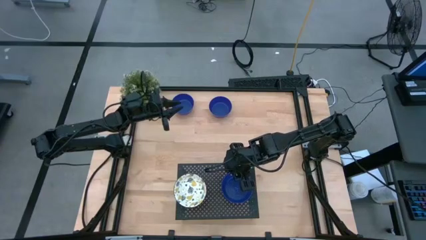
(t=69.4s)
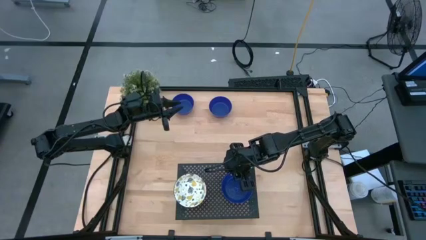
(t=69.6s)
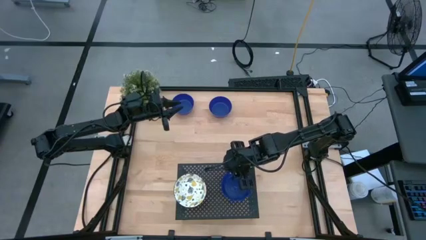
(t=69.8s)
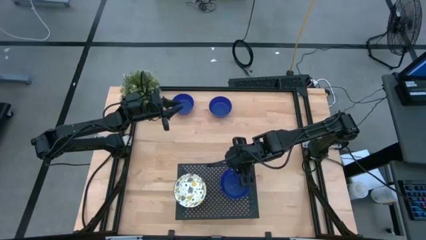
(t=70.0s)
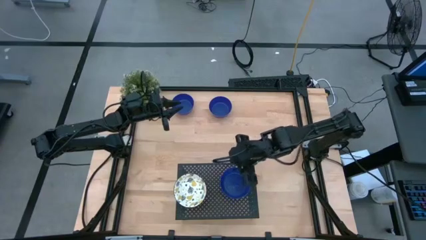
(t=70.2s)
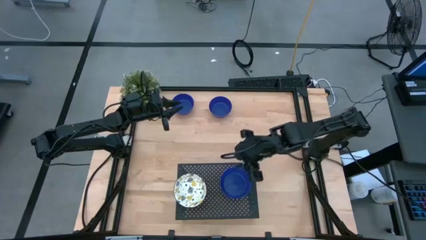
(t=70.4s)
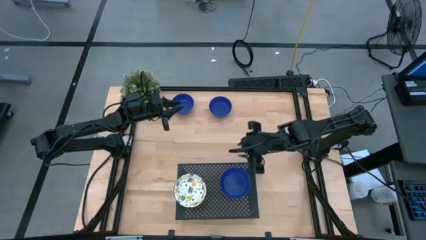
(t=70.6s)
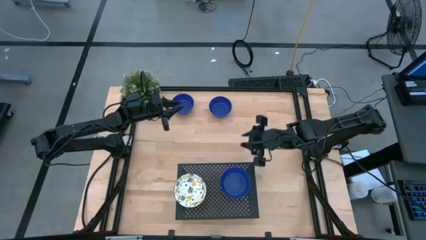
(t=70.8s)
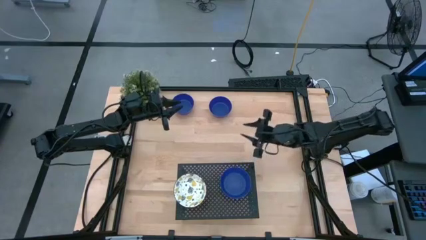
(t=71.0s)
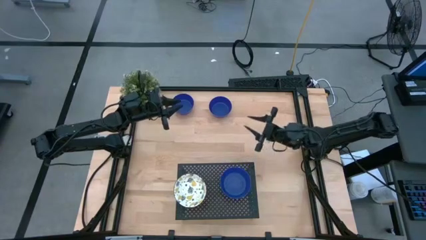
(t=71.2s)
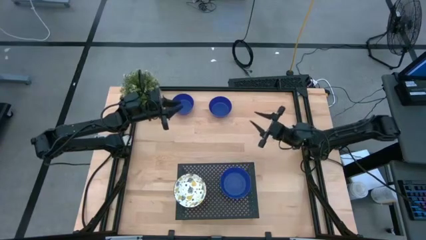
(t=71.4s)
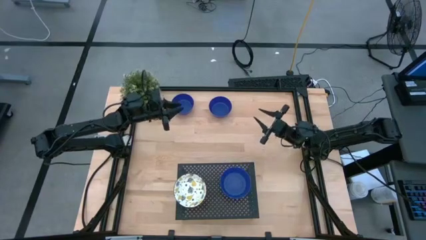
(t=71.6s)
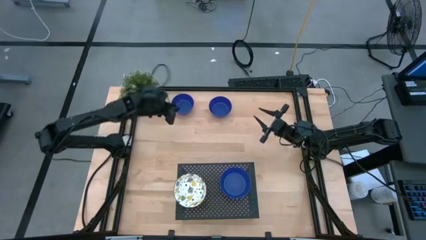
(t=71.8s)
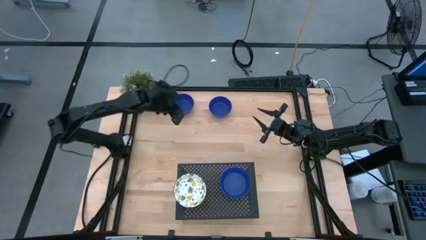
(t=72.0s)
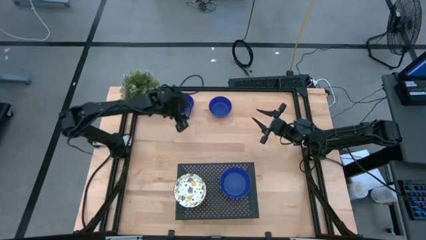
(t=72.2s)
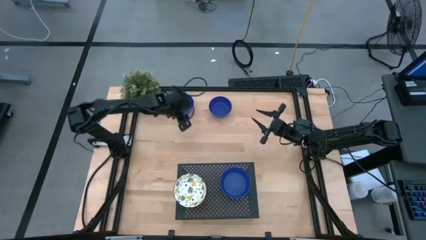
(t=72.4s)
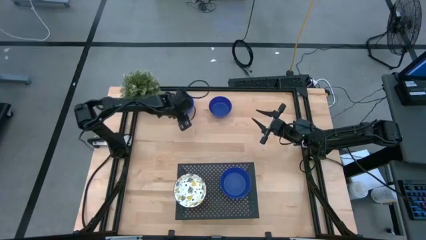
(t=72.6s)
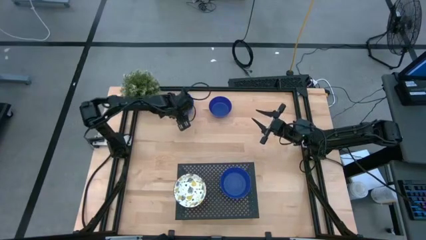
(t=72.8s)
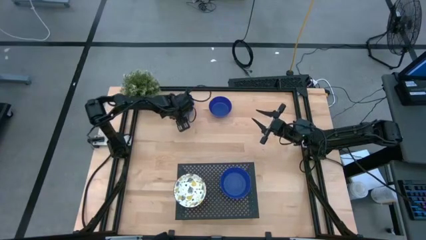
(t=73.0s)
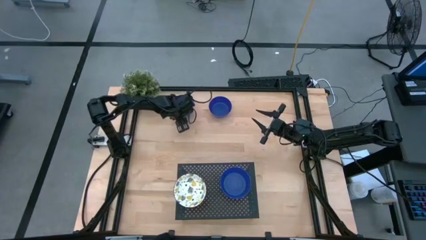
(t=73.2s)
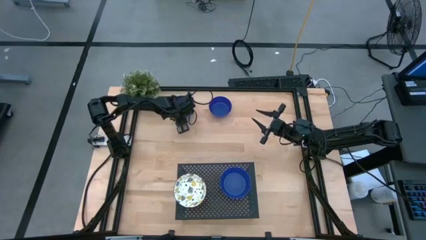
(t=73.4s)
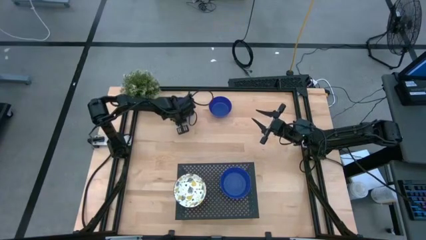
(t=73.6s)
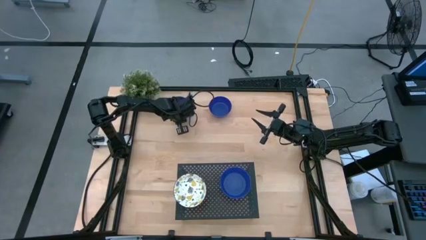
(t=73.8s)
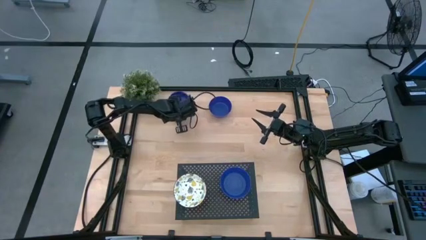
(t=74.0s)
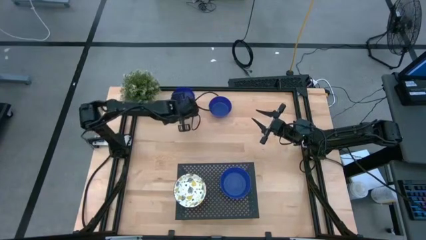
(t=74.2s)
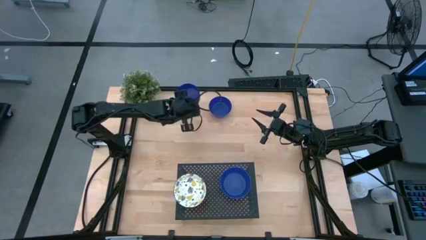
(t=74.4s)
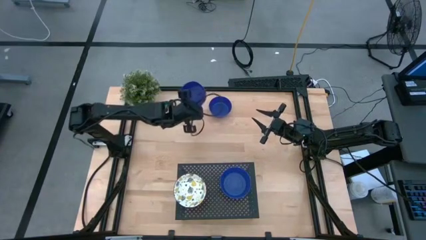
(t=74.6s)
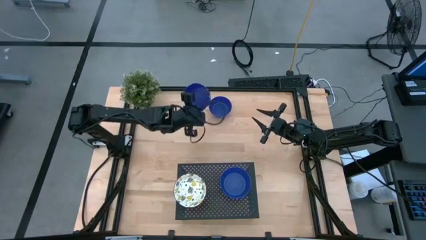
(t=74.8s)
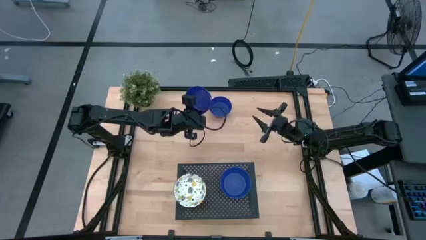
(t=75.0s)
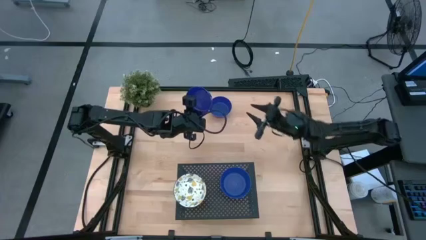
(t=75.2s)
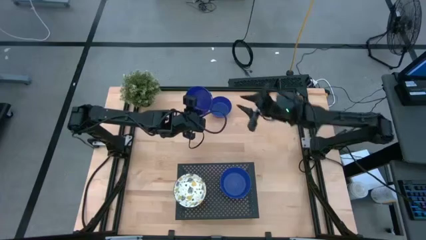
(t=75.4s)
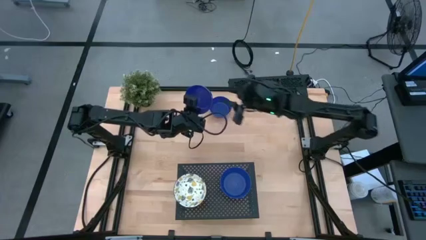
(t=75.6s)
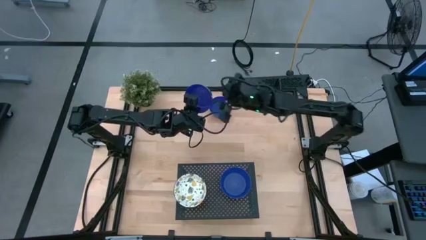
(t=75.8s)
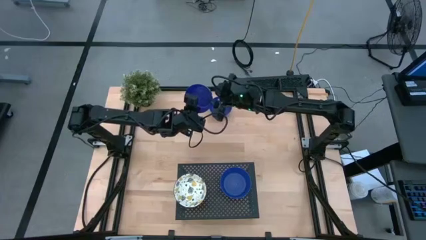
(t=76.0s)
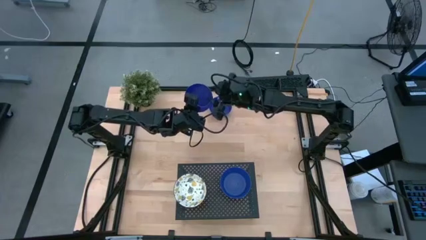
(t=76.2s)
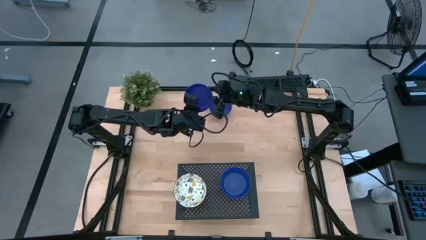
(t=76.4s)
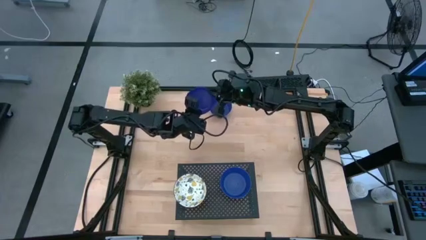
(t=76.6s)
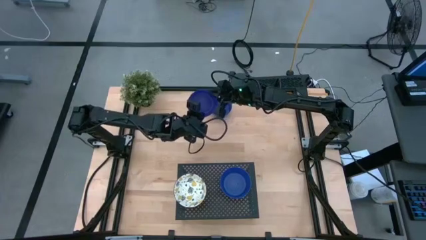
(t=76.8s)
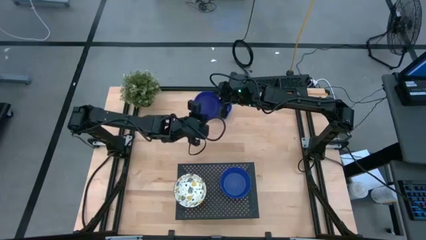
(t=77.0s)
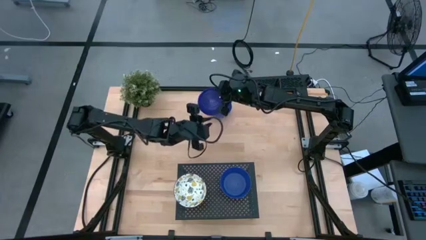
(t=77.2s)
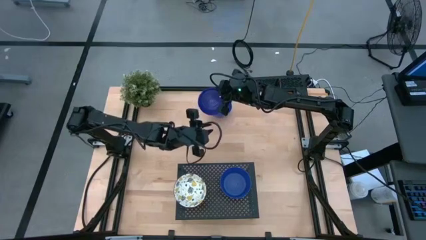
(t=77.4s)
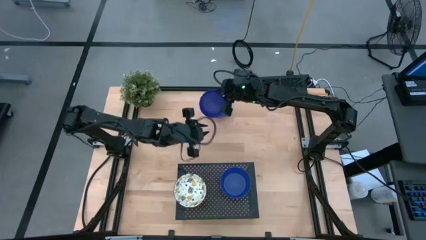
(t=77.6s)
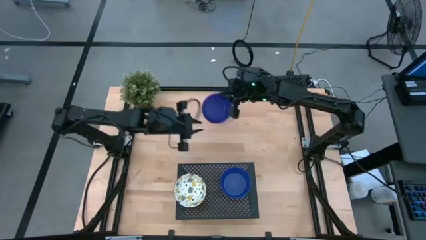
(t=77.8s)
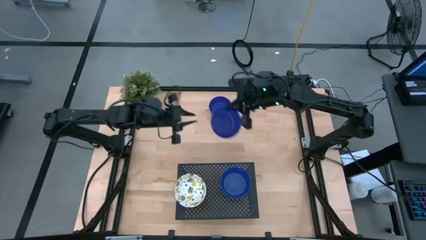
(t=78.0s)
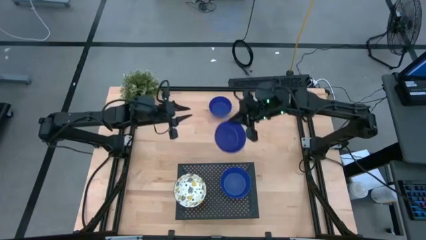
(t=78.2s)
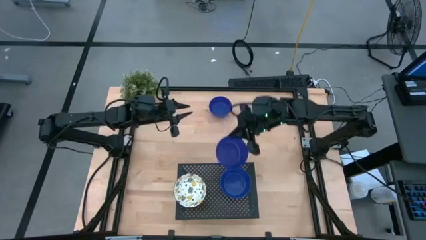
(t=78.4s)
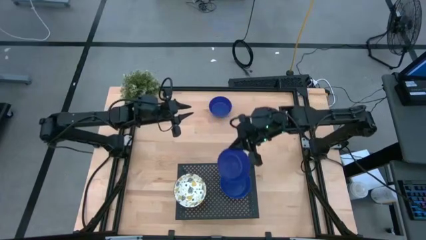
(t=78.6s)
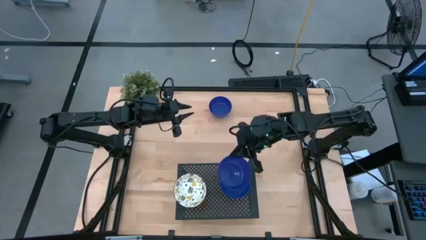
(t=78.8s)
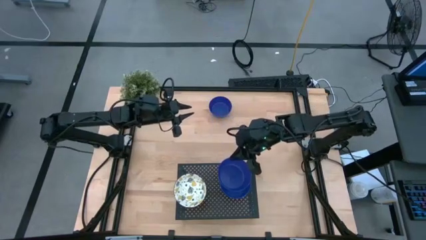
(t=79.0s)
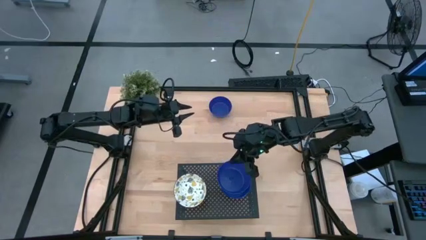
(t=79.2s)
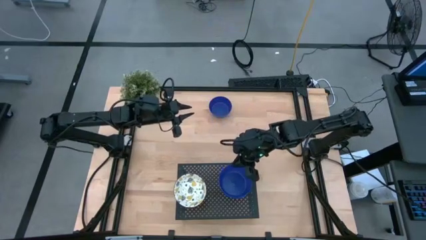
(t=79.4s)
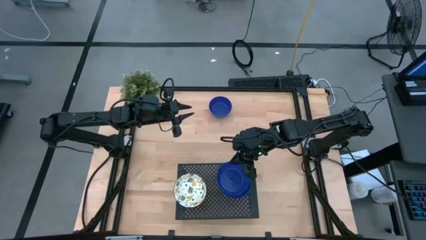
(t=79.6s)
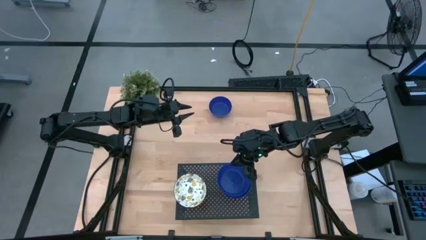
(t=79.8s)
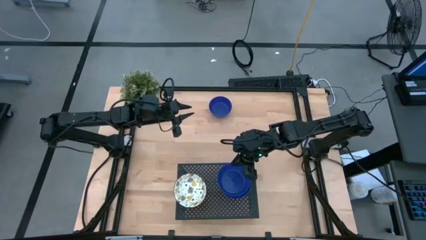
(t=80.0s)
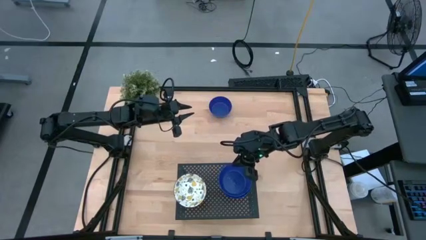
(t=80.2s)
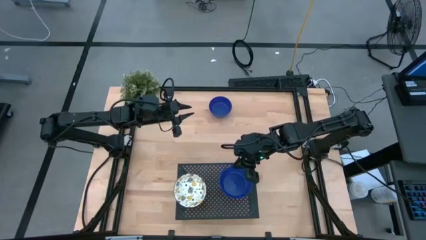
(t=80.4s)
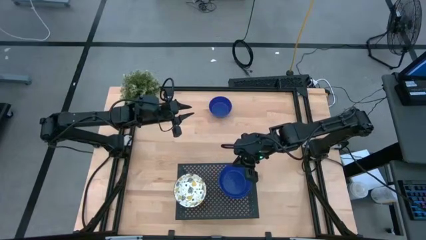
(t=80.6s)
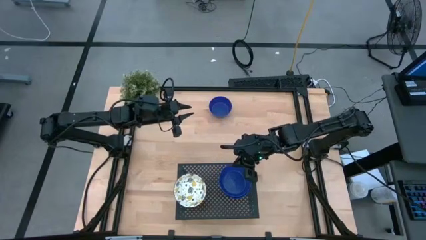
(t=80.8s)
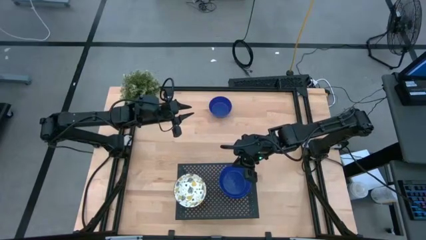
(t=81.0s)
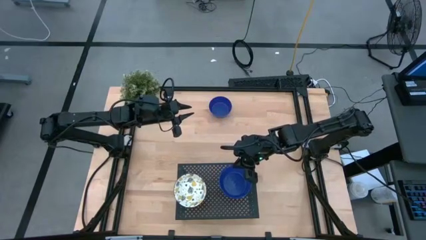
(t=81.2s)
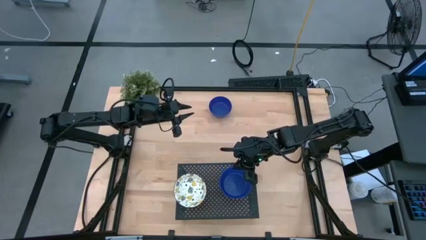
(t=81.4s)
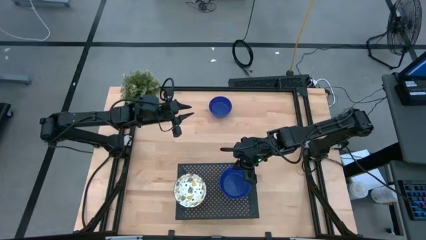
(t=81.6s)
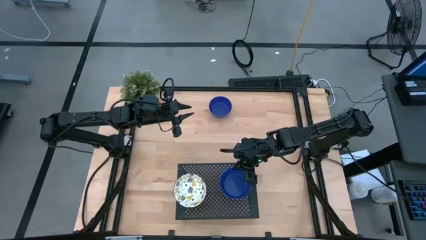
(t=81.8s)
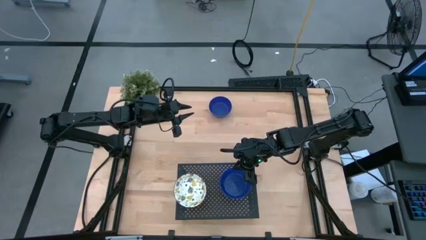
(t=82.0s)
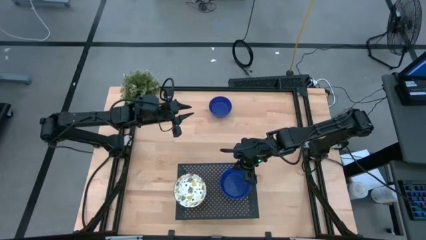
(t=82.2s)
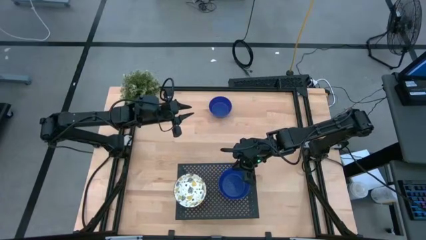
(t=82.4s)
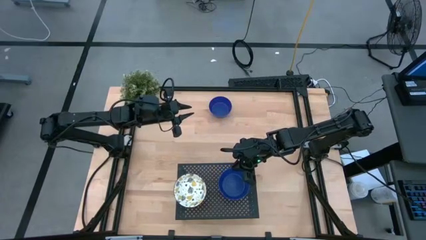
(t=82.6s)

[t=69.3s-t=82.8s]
Task: Pick & Place Mini bowls
Stack the left blue bowl on the blue bowl on the shelf

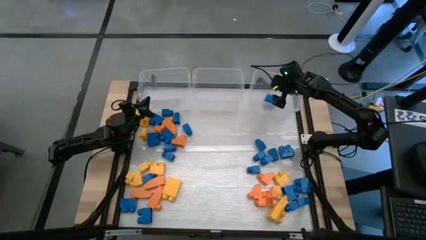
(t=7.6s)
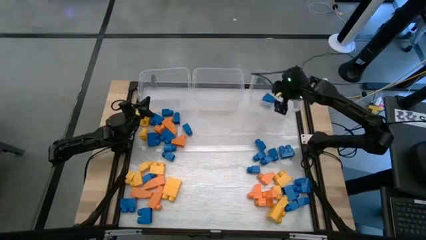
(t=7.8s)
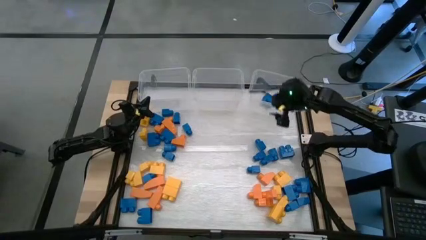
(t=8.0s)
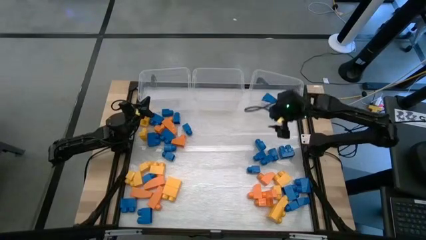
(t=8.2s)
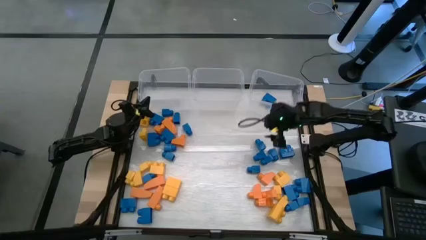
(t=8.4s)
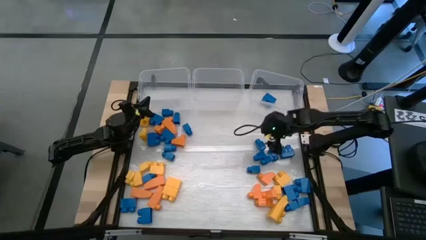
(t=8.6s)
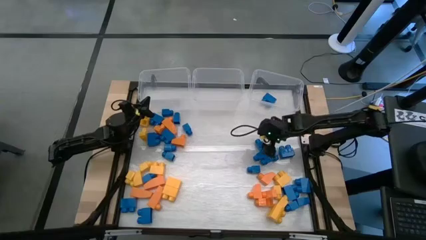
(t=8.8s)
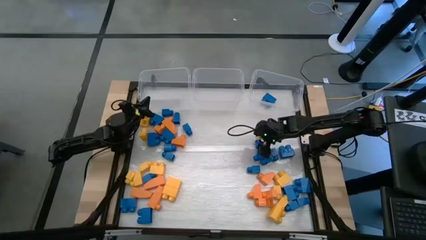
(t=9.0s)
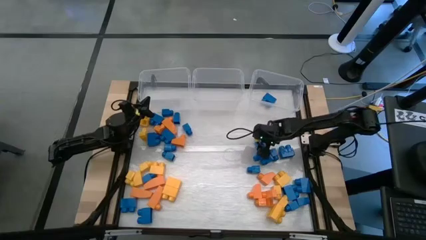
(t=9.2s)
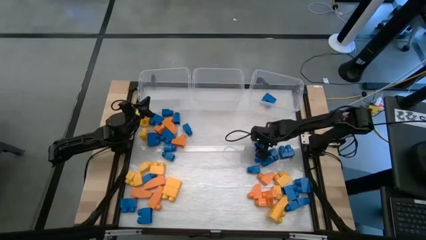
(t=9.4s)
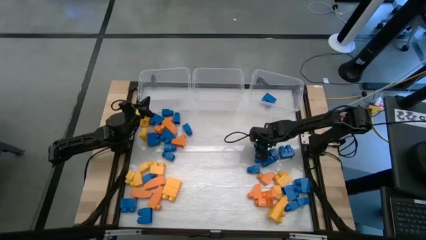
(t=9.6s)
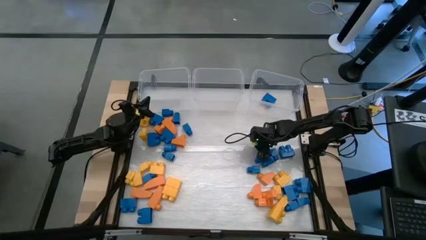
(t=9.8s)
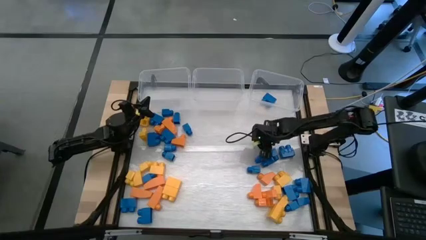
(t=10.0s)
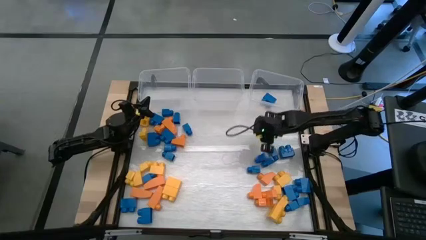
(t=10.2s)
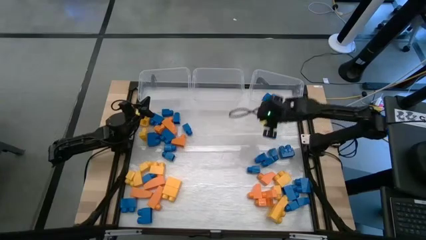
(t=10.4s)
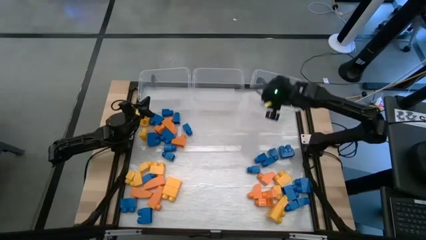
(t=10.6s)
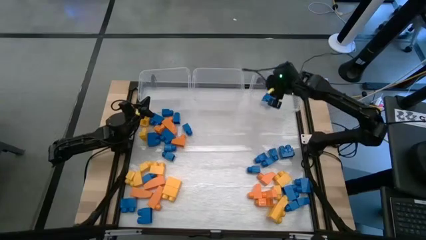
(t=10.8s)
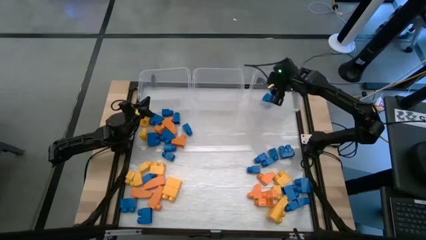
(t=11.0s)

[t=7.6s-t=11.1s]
Task: Sort blocks
Put the blue game piece into the right transparent bin
